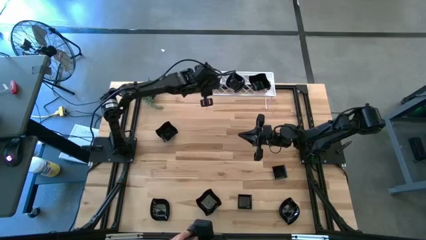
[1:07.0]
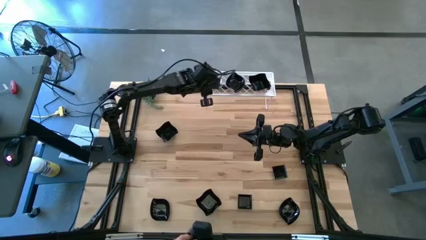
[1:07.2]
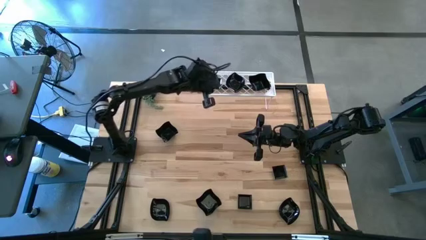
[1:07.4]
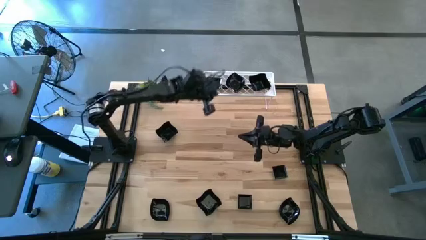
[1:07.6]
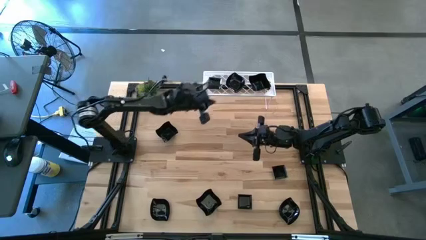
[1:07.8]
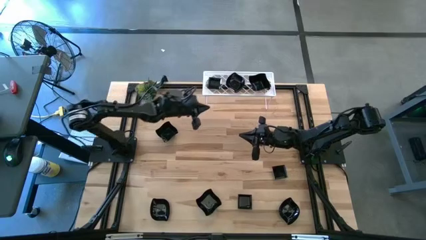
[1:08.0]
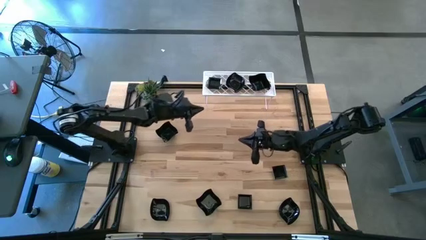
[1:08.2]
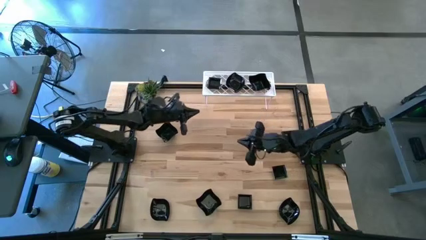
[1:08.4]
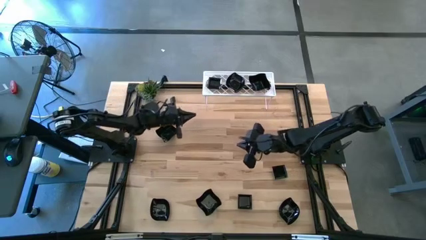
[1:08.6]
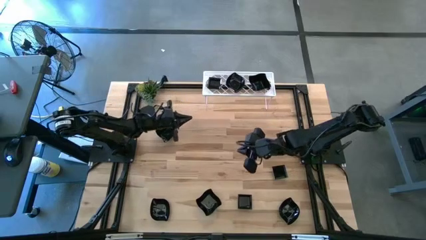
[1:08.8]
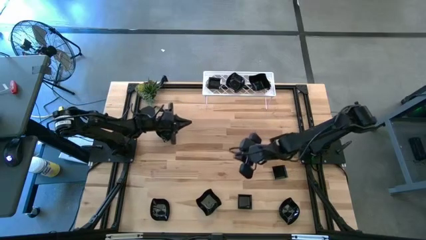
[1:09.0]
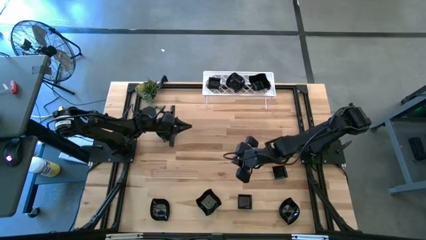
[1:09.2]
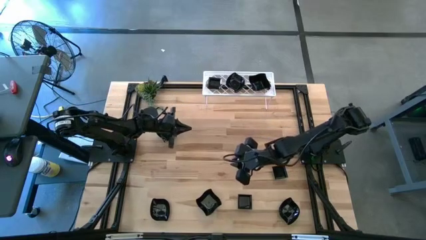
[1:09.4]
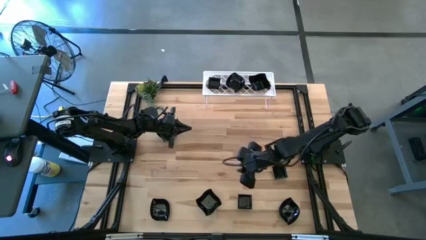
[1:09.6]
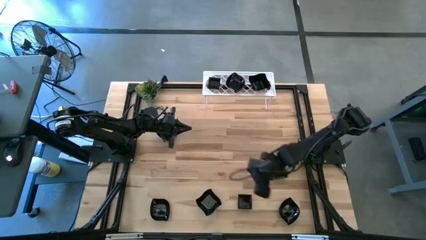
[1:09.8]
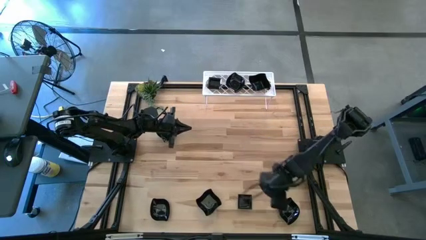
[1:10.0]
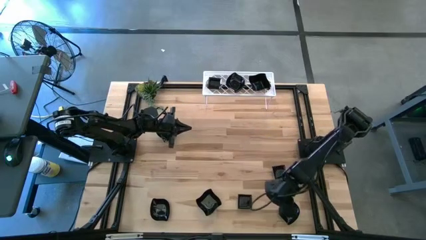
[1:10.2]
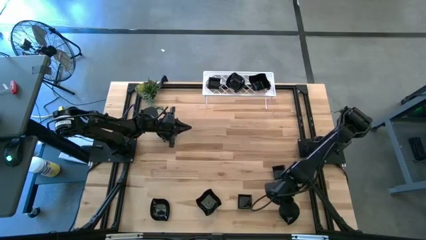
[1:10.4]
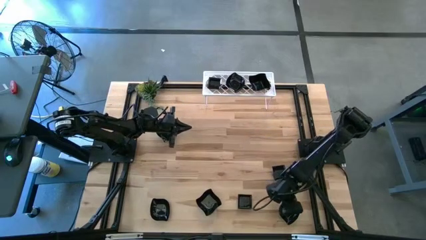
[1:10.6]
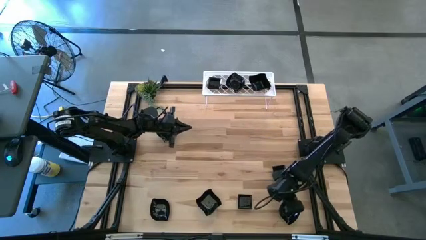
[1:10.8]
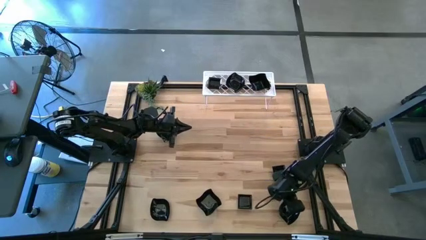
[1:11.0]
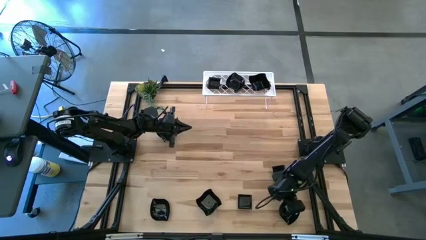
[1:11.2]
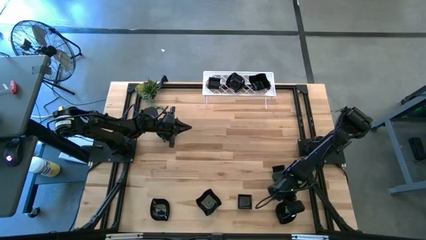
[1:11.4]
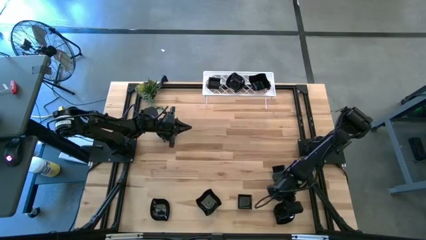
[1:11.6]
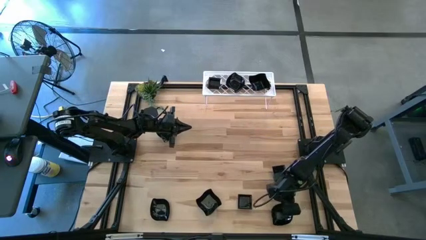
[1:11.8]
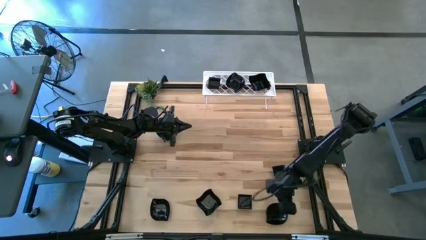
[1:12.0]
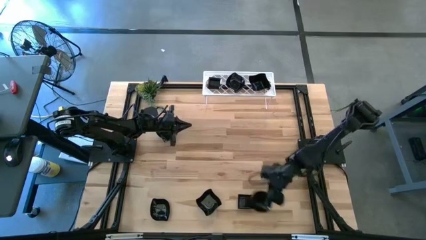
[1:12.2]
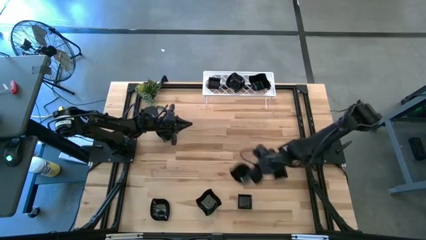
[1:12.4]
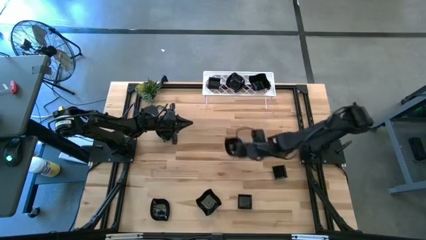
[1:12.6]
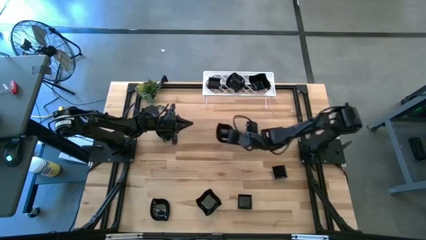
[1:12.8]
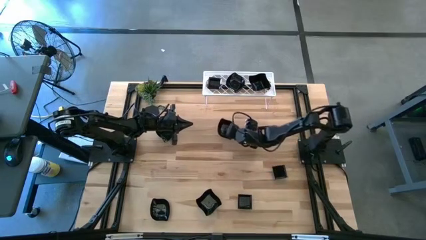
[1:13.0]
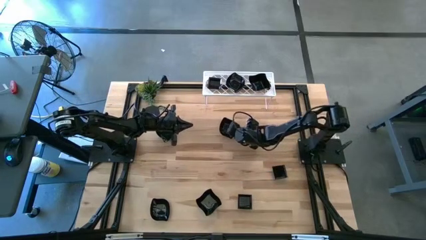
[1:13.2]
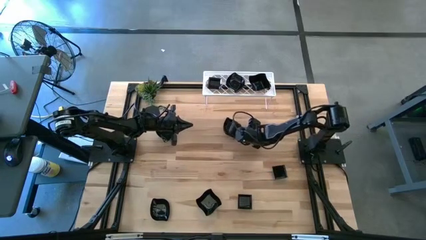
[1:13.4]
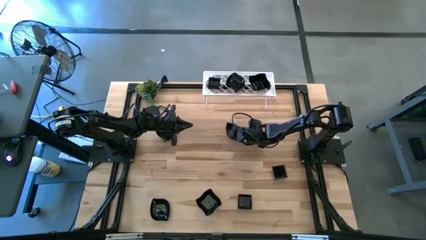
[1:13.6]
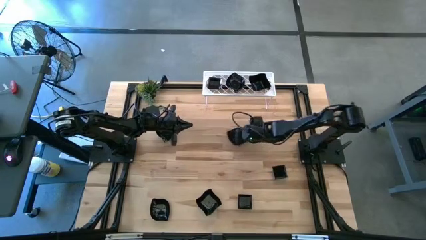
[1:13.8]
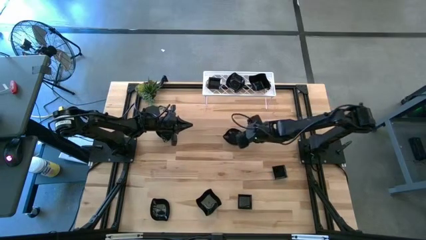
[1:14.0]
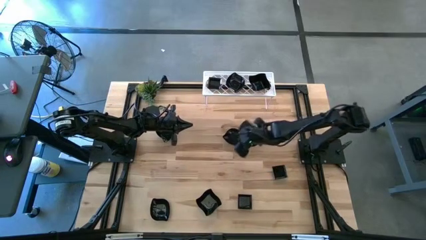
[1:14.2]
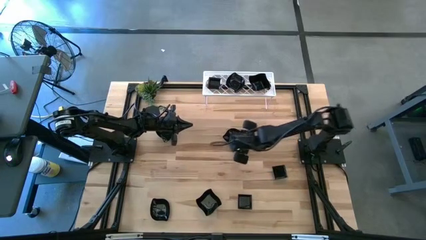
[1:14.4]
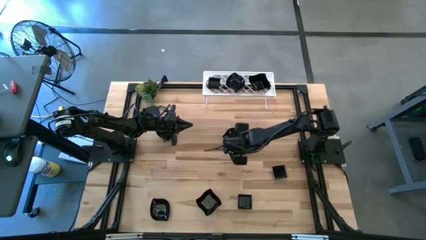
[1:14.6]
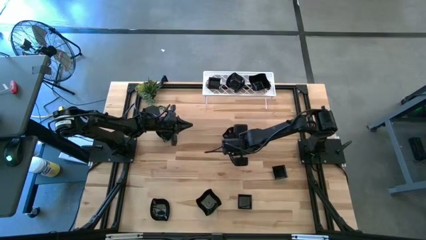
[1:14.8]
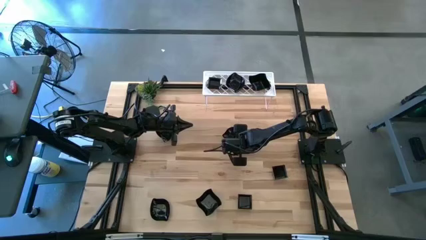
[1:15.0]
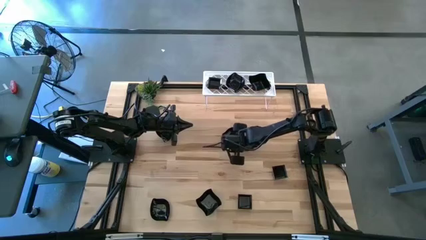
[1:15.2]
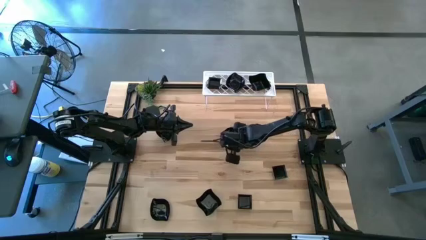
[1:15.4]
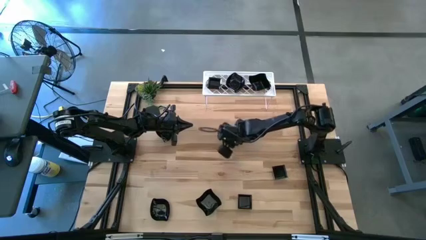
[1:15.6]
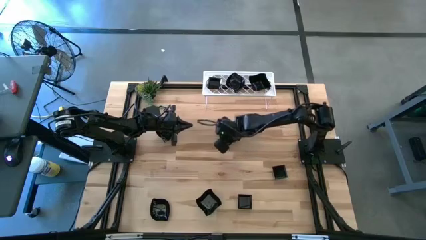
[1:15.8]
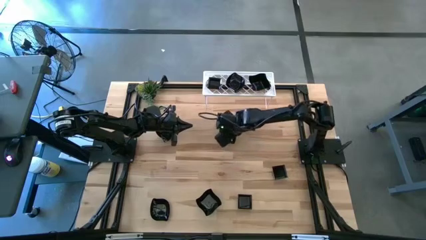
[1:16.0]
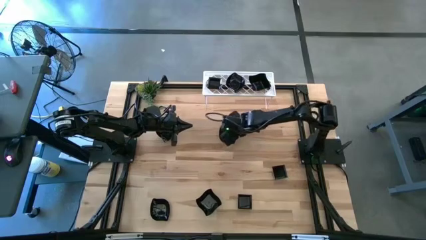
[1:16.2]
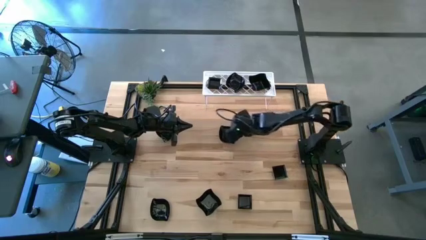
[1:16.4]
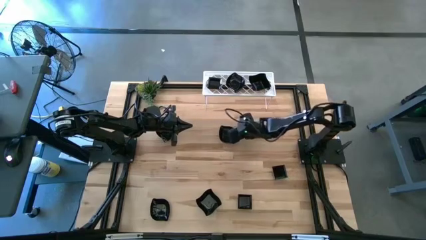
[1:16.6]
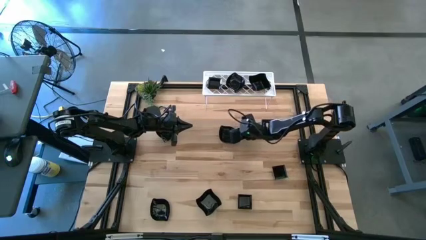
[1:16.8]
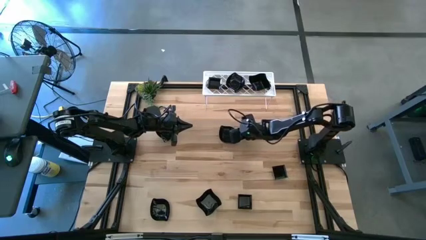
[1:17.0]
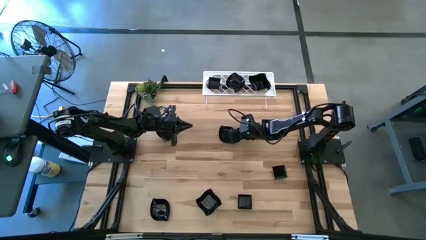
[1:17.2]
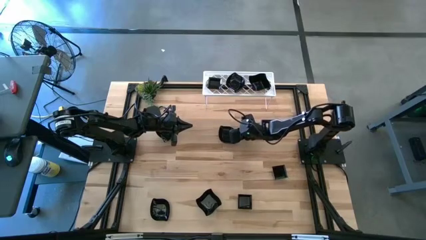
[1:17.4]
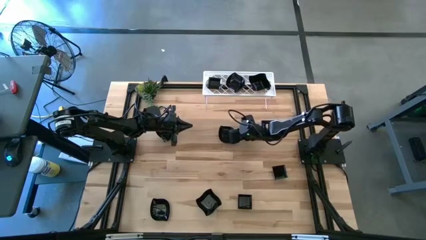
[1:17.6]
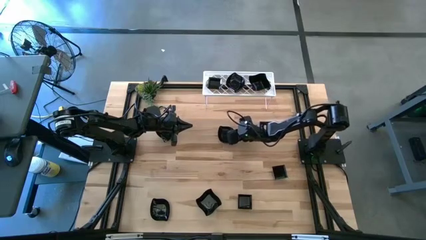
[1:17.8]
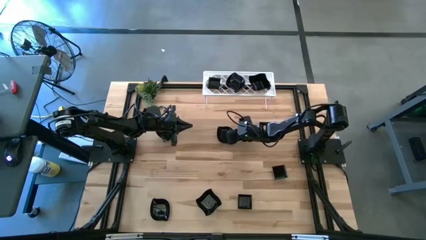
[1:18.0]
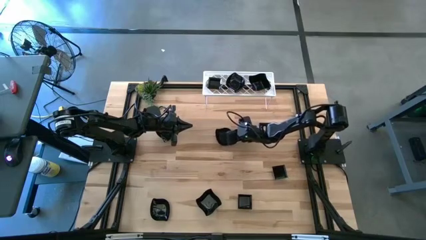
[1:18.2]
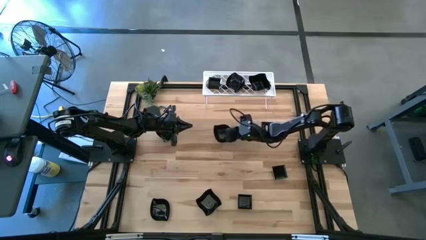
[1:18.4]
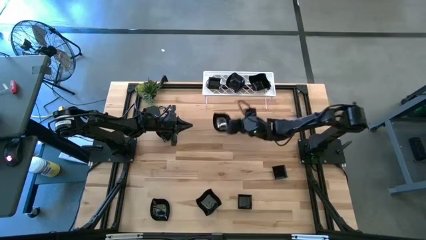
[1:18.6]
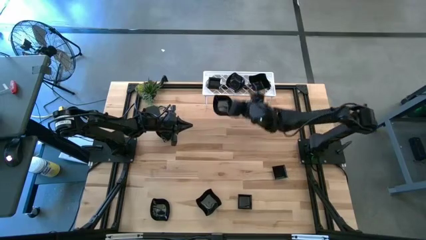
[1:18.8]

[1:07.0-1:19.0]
Task: Pick & Place Mini shaped plates
Stack the leaf shaped plate on top of the stacked leaf shaped plates on the shelf
